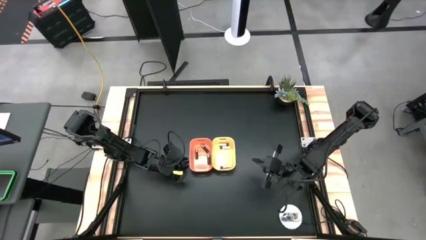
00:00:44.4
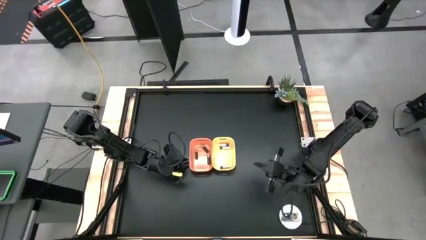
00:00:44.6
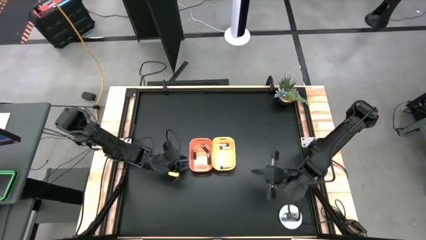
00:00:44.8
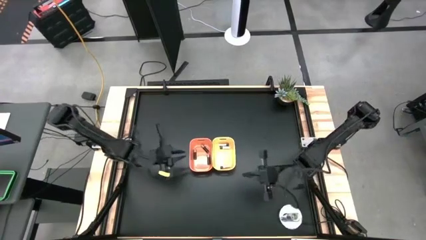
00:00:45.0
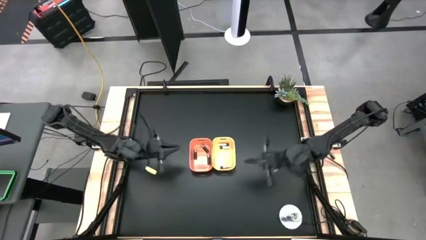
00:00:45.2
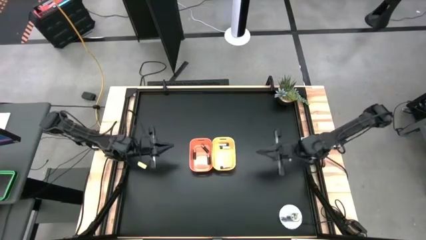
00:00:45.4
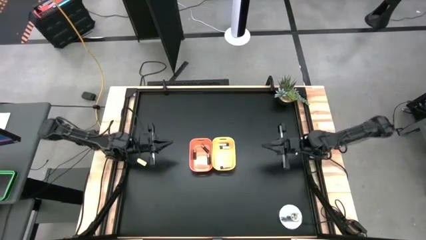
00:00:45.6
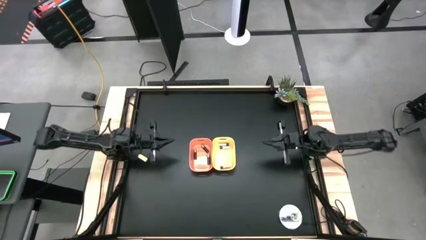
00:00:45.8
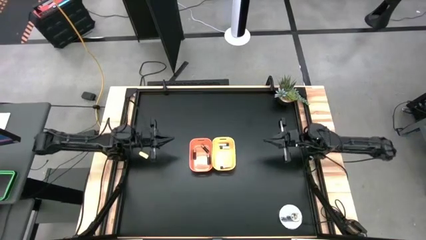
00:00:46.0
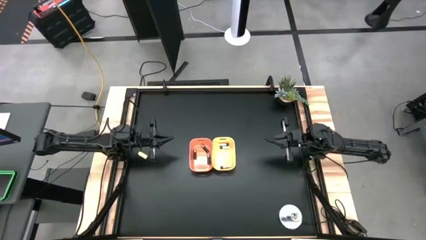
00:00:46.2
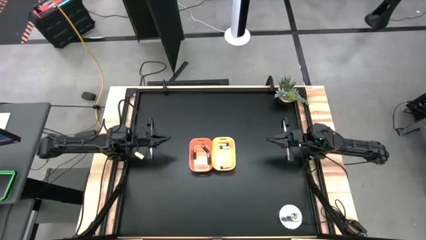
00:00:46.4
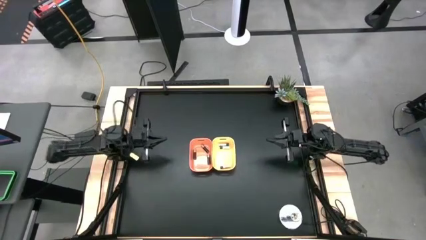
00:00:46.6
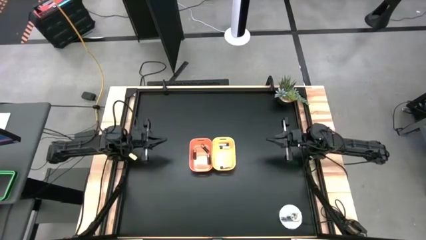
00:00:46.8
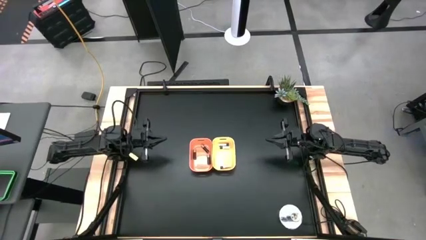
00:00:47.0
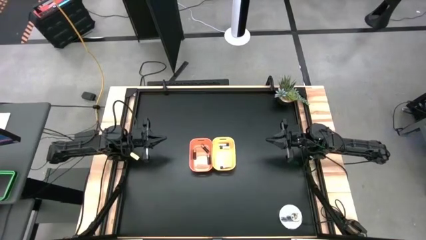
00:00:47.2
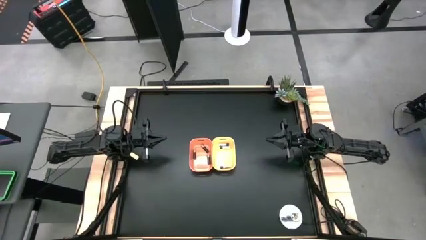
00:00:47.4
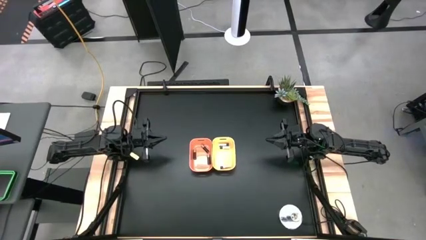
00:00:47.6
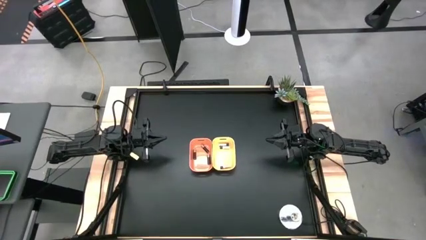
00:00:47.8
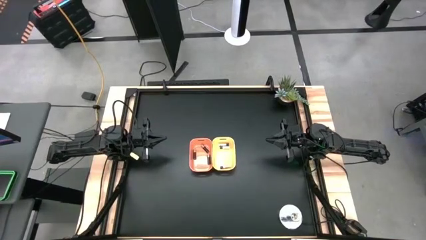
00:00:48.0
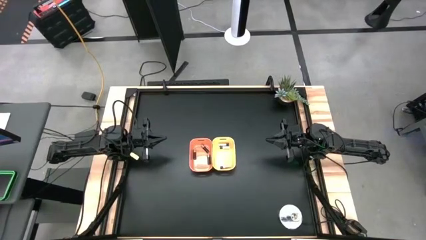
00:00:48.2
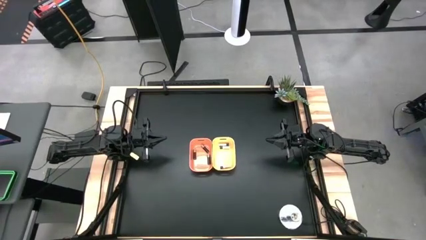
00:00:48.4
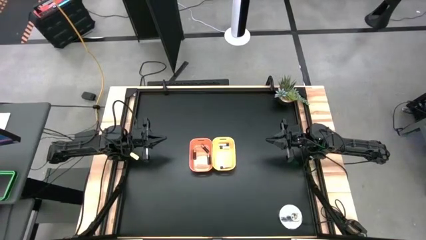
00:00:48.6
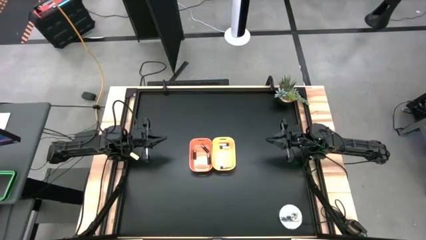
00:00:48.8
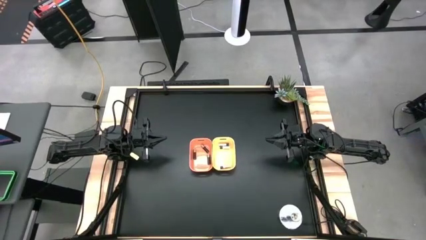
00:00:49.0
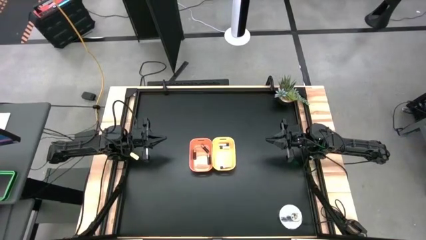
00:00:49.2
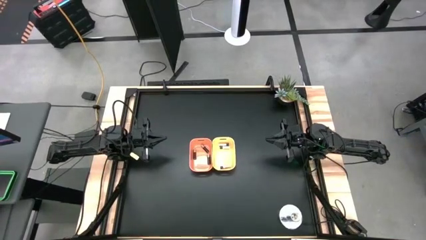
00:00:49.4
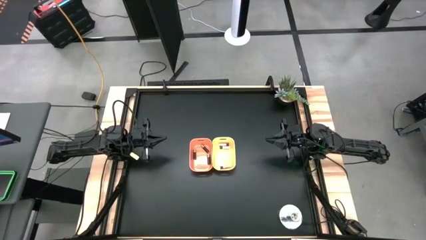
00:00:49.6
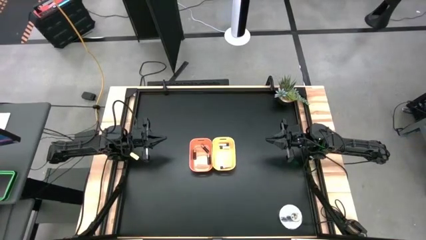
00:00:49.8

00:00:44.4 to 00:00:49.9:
Task: Sort batteries
Return to Home Position

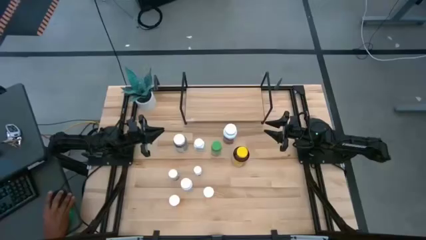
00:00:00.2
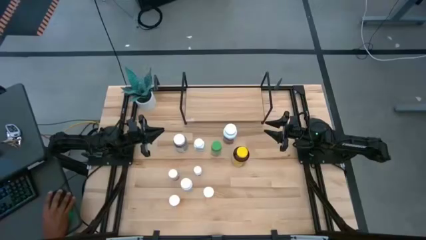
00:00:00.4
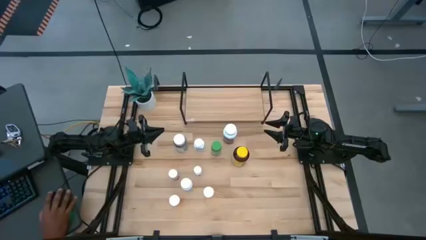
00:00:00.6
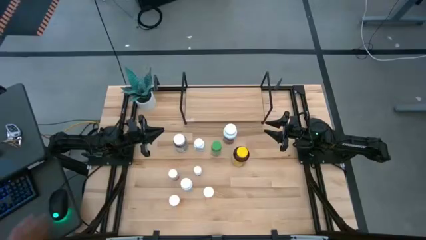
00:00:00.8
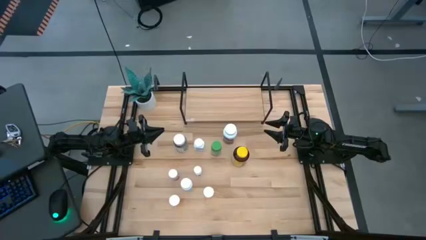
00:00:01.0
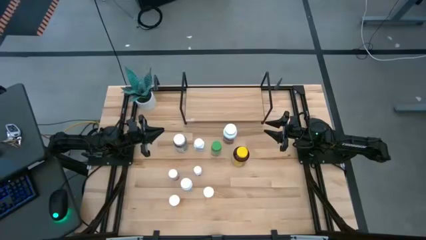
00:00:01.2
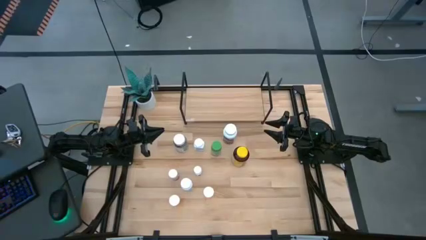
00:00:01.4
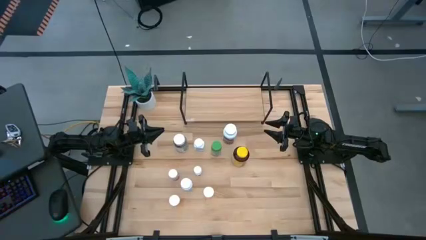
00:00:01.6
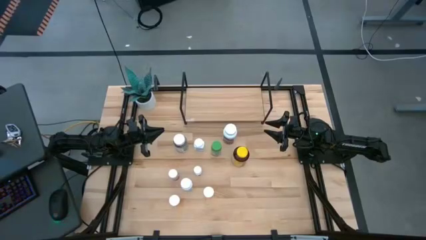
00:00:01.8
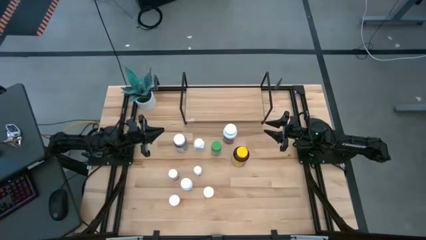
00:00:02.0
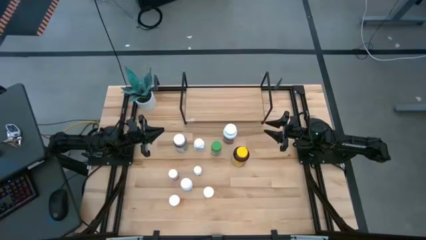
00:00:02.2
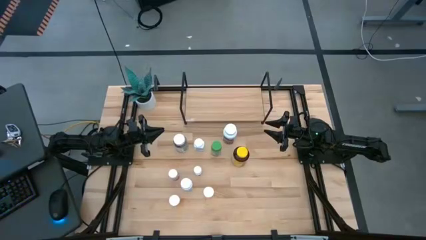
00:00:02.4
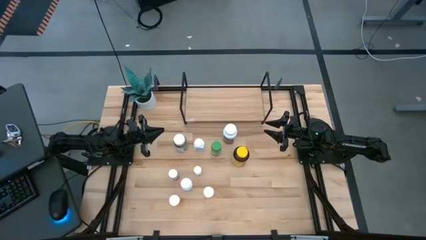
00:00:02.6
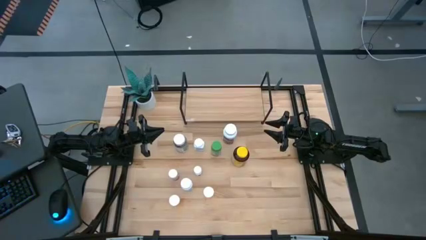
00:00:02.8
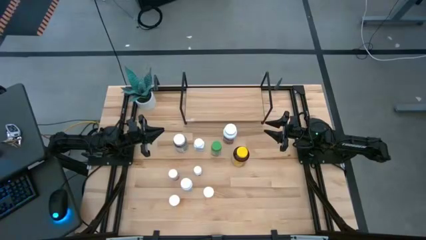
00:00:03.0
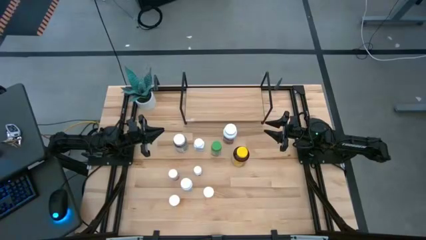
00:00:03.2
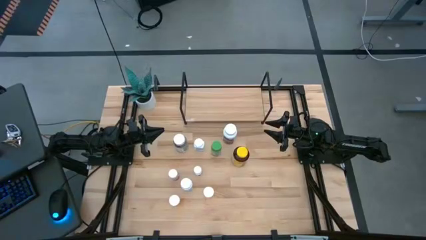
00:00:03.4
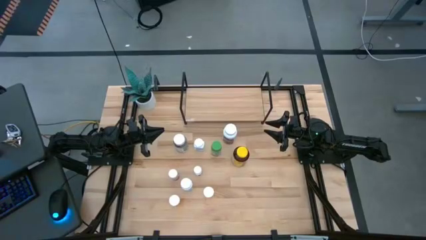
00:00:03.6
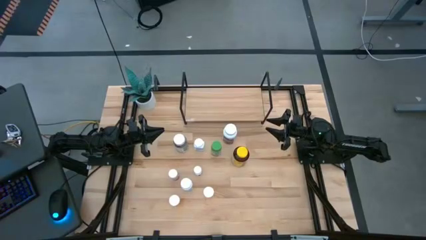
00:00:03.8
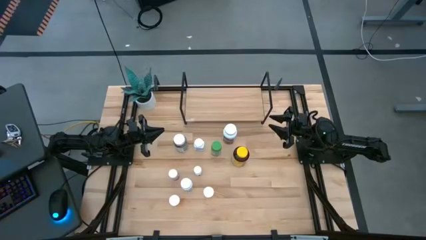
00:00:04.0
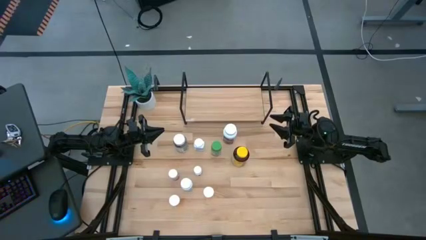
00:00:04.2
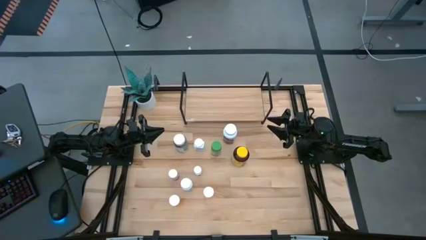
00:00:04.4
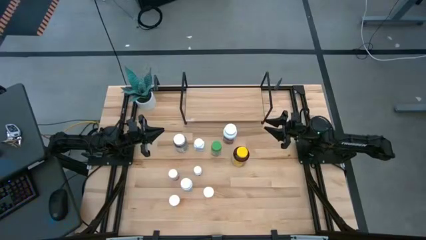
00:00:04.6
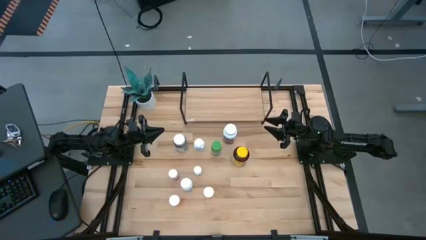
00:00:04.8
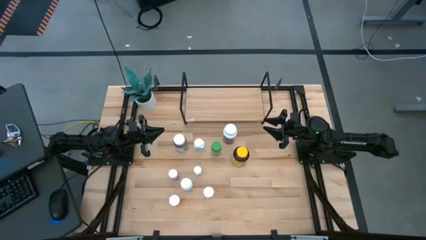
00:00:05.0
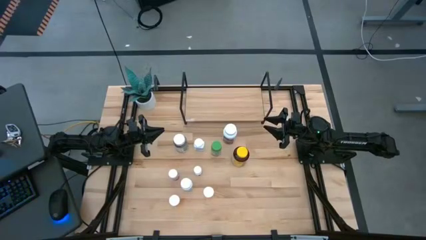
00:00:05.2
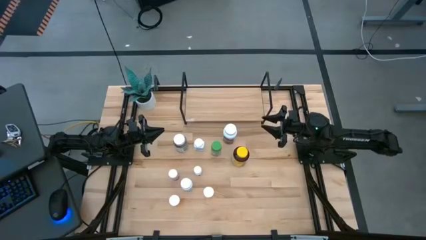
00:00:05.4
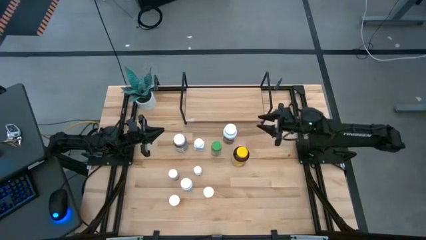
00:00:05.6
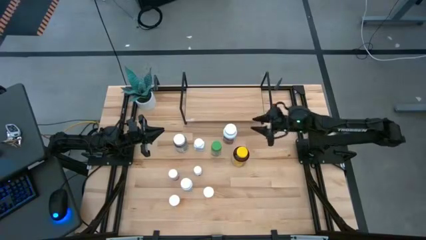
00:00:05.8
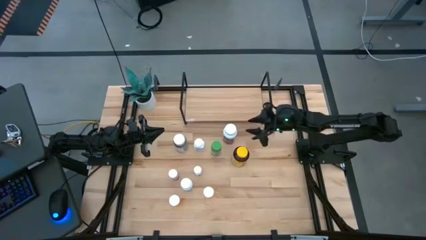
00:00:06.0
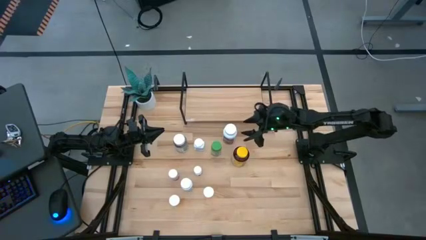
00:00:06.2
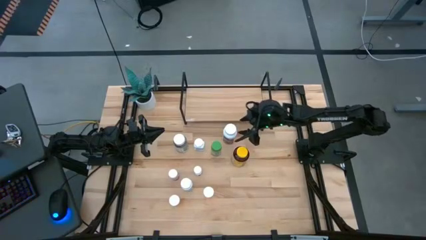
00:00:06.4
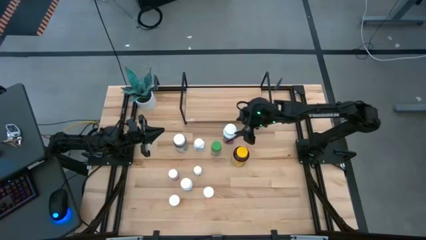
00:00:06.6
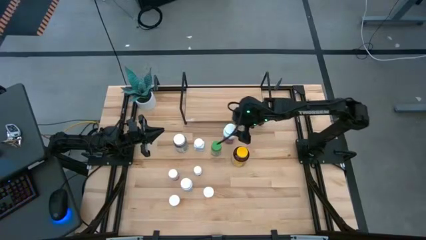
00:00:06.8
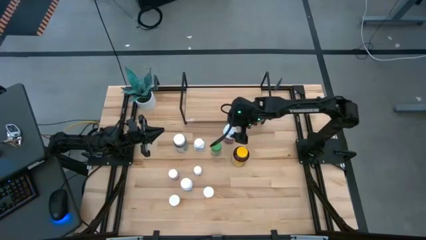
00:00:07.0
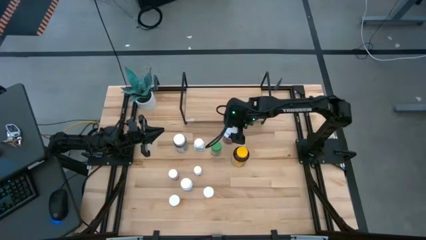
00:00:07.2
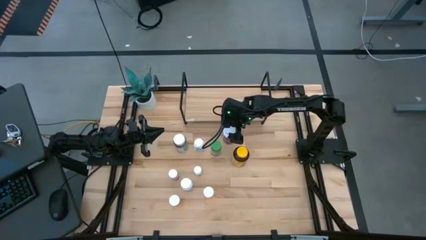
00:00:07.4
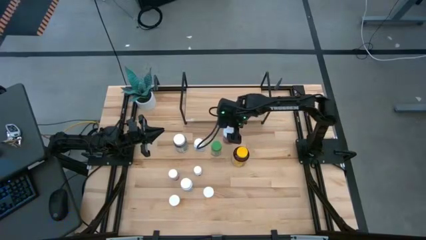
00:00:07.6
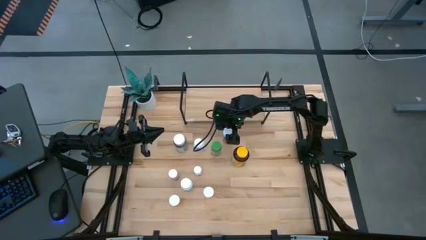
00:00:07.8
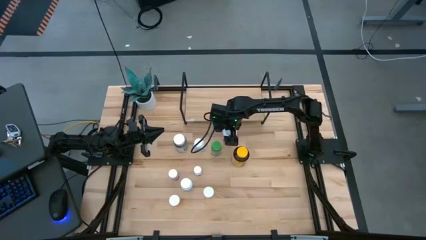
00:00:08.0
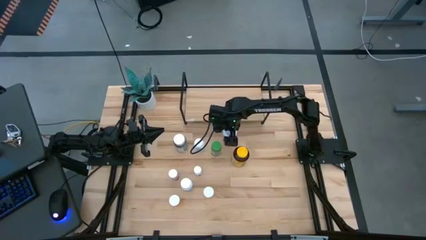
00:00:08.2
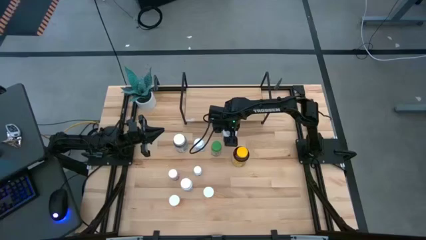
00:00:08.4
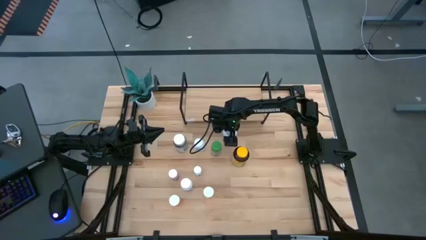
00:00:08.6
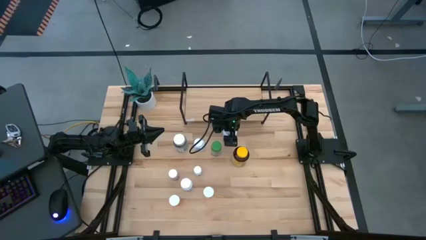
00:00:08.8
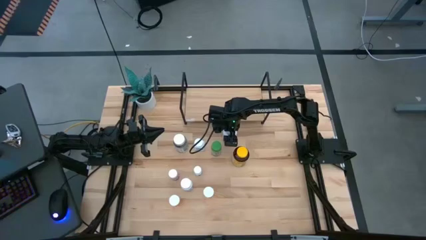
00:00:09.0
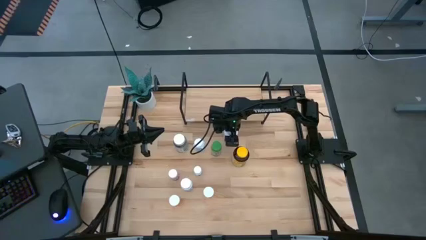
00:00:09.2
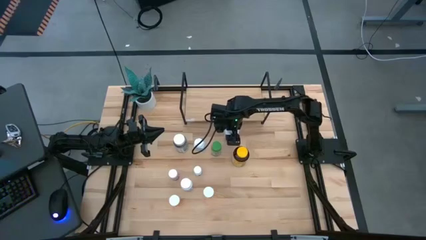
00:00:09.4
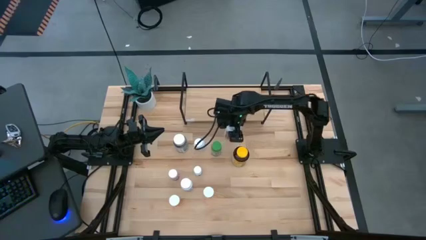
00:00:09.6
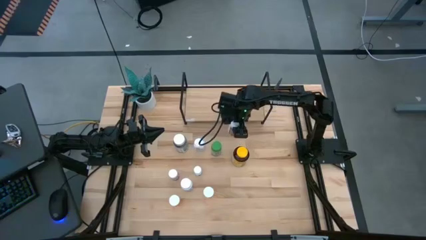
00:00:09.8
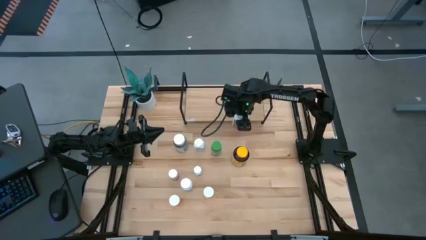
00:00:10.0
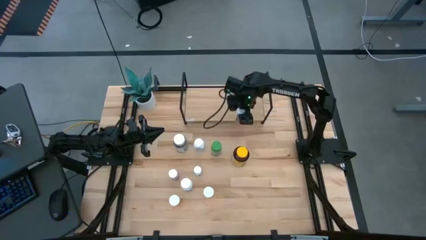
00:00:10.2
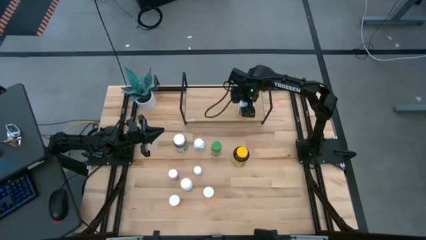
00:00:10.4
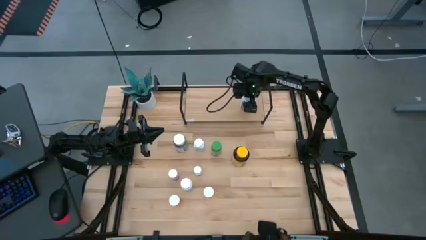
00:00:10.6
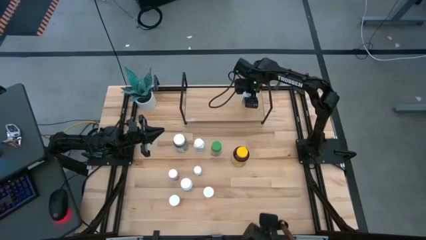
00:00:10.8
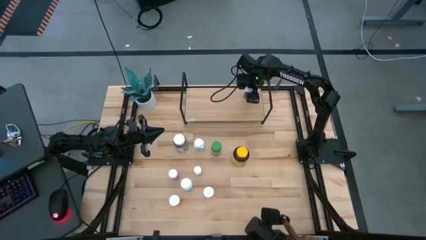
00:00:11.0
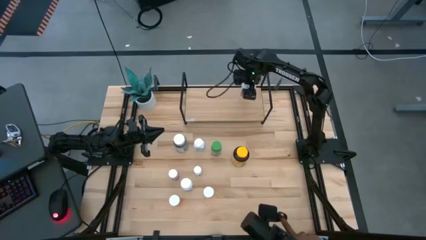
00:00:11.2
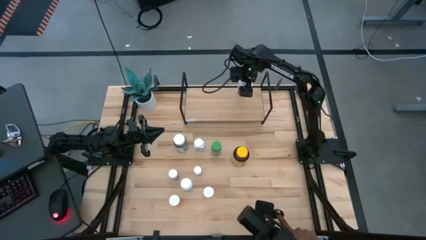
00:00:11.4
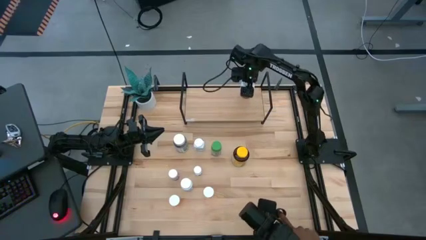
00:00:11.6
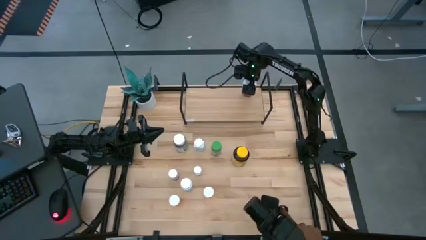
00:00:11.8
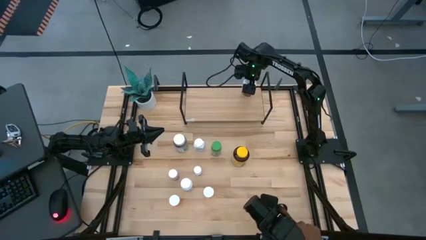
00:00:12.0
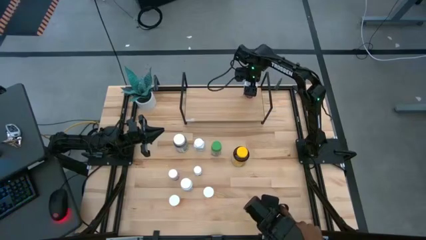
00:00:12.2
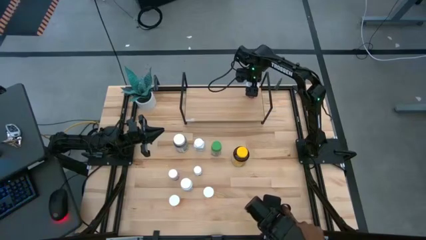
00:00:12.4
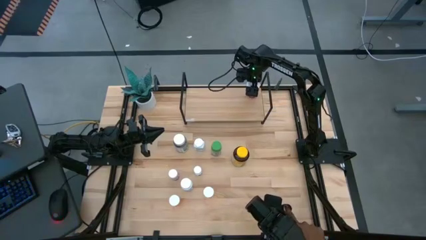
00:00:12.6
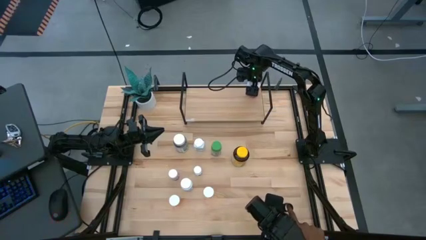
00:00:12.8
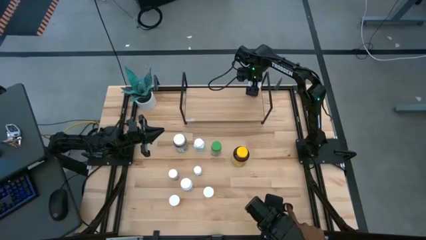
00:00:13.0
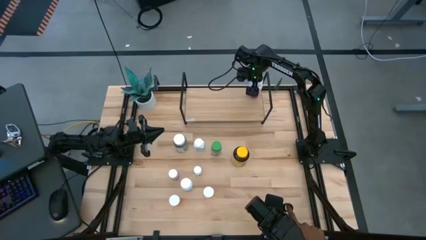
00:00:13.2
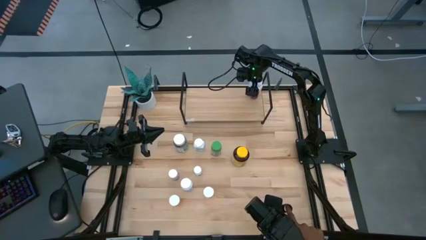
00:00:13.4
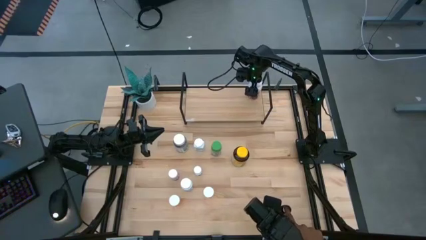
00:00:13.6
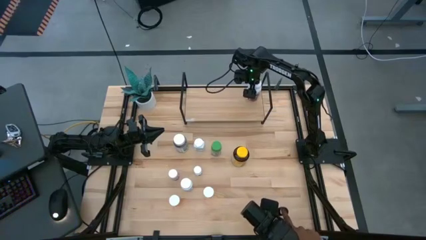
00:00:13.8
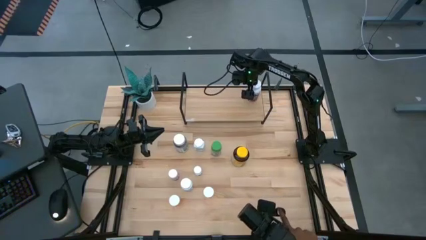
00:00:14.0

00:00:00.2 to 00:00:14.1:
Task: Pick and place medicine bottles onto shelf by color
Put the large white medicine bottle on the shelf
